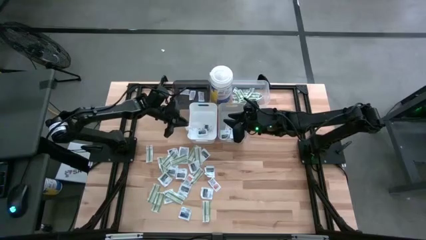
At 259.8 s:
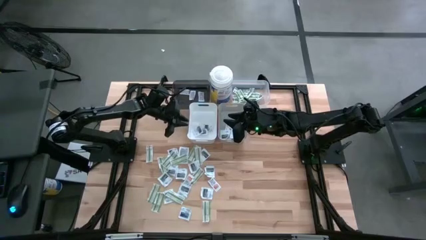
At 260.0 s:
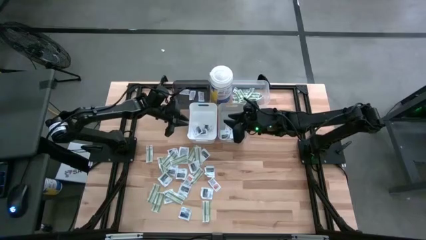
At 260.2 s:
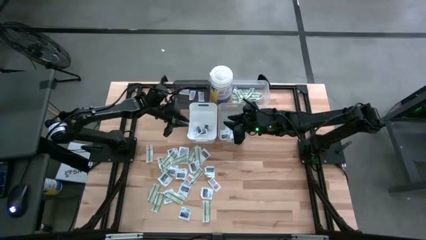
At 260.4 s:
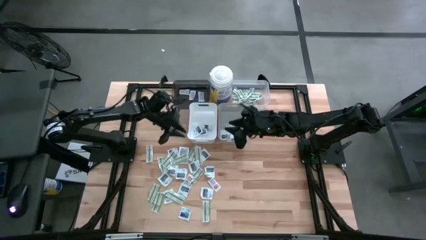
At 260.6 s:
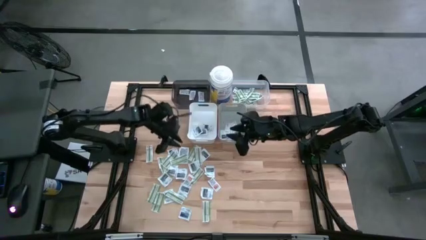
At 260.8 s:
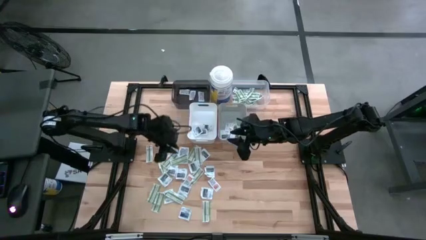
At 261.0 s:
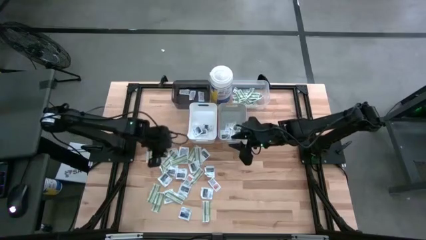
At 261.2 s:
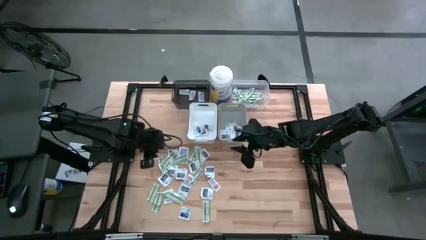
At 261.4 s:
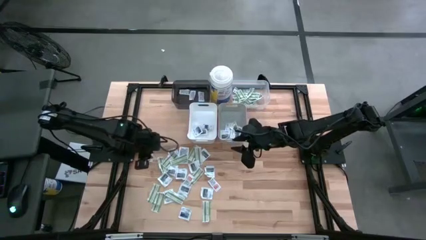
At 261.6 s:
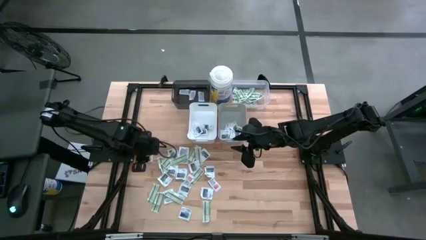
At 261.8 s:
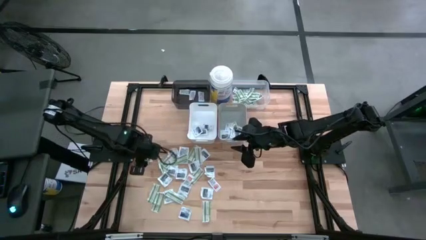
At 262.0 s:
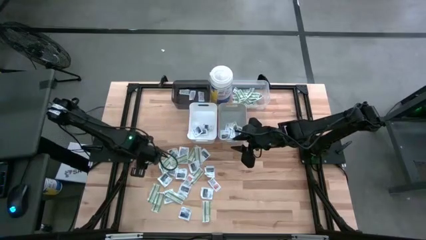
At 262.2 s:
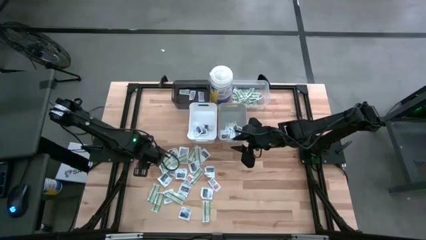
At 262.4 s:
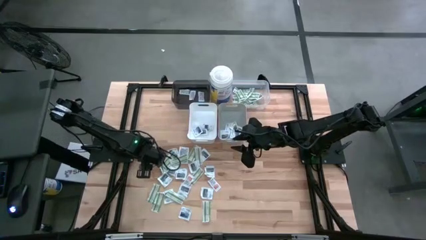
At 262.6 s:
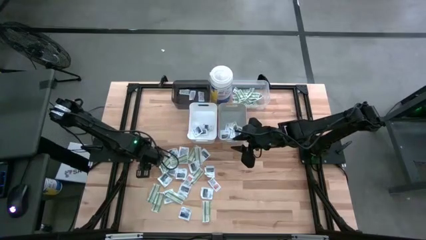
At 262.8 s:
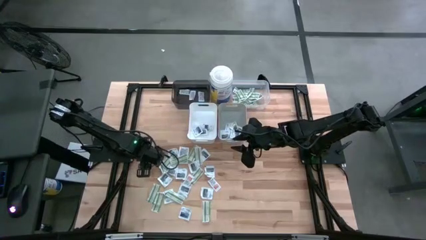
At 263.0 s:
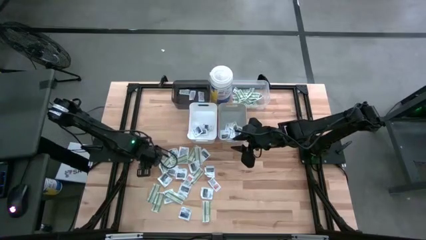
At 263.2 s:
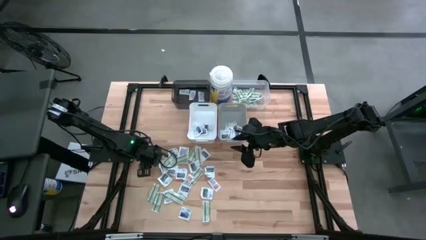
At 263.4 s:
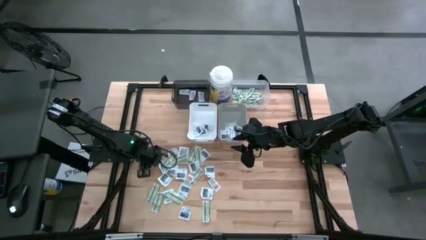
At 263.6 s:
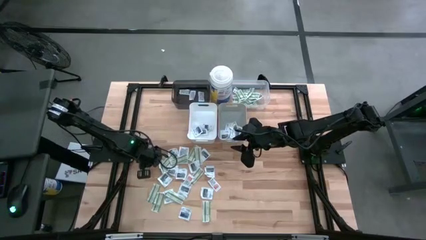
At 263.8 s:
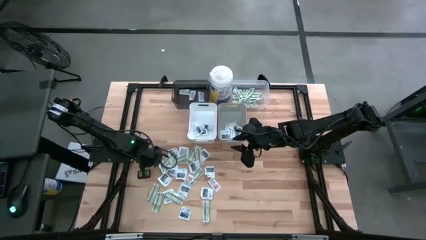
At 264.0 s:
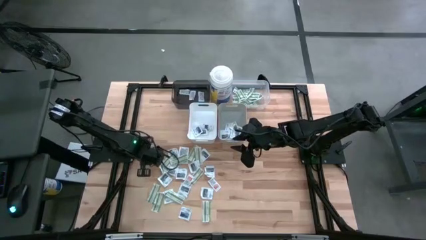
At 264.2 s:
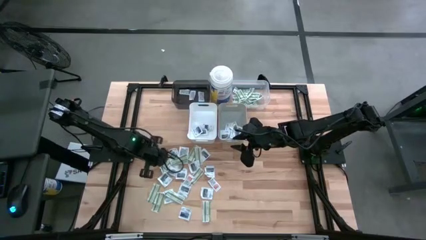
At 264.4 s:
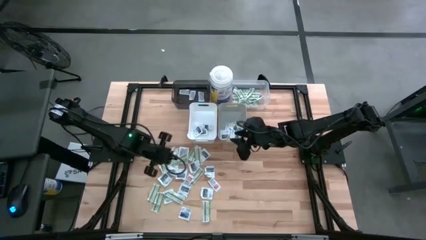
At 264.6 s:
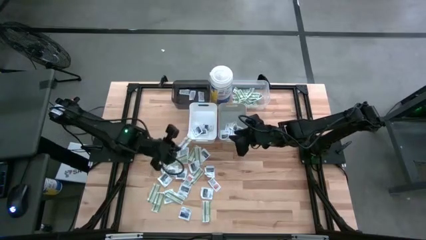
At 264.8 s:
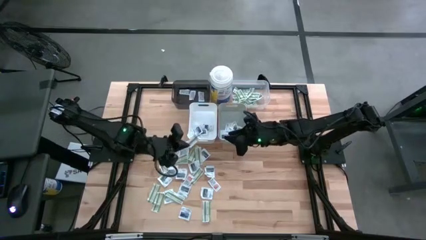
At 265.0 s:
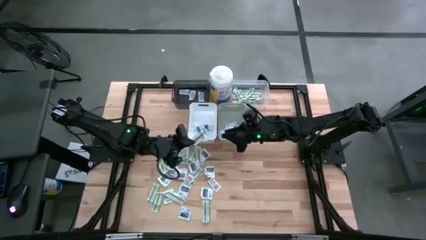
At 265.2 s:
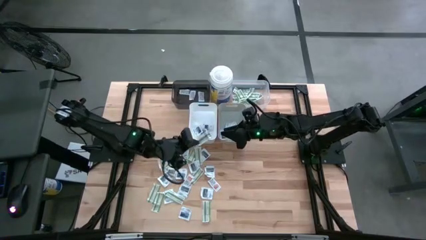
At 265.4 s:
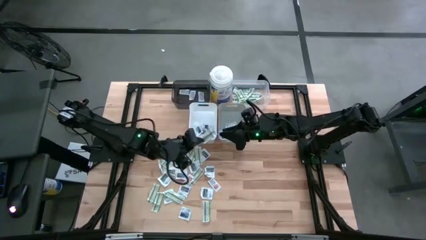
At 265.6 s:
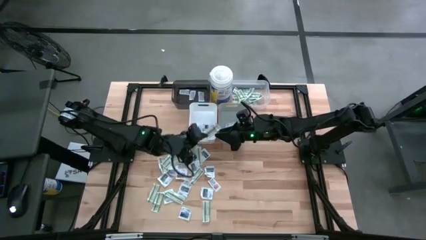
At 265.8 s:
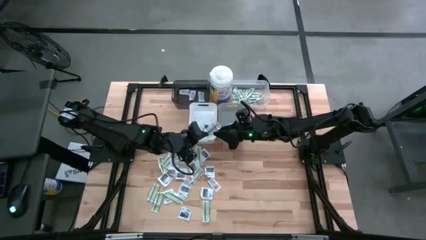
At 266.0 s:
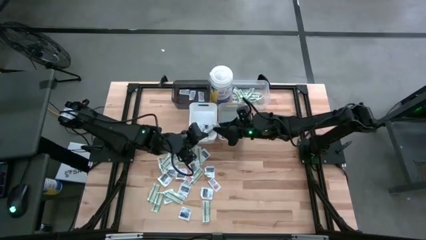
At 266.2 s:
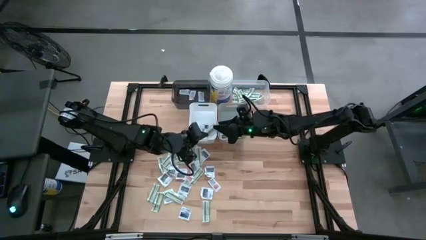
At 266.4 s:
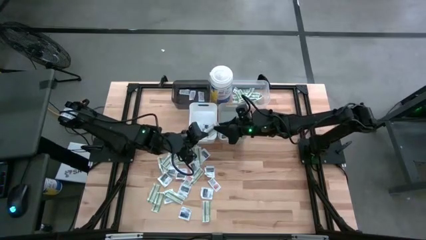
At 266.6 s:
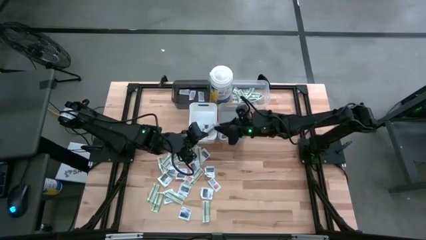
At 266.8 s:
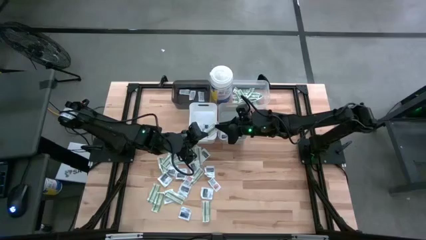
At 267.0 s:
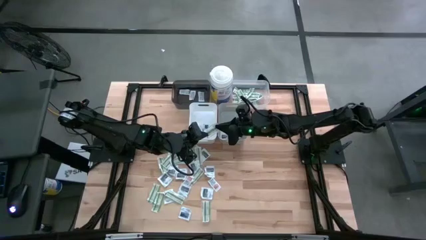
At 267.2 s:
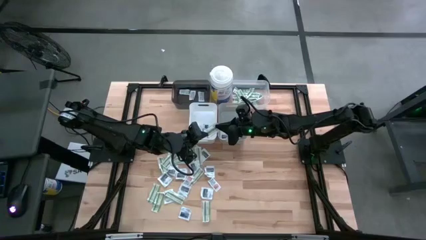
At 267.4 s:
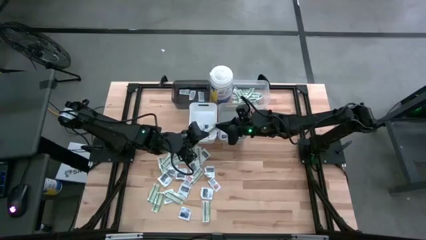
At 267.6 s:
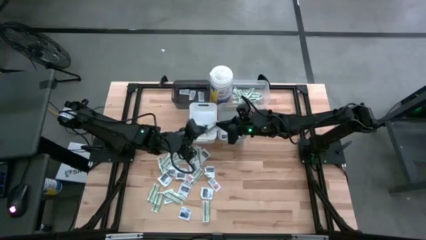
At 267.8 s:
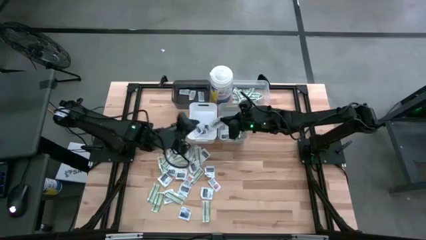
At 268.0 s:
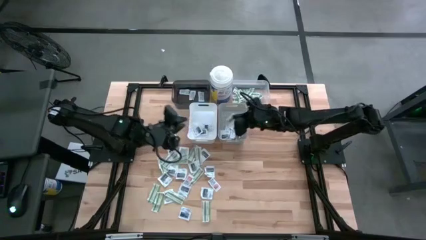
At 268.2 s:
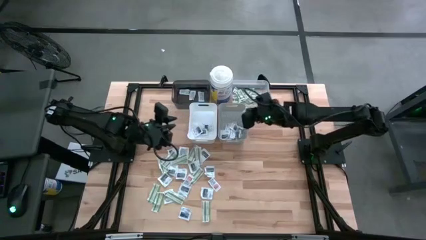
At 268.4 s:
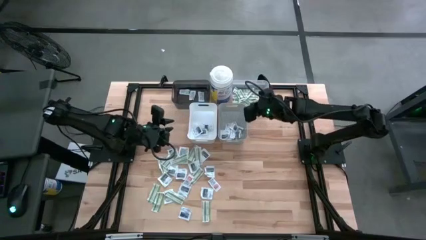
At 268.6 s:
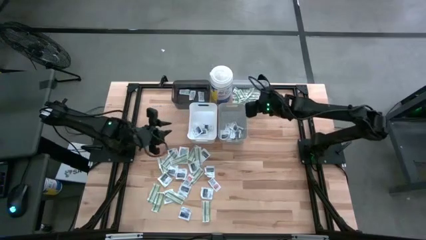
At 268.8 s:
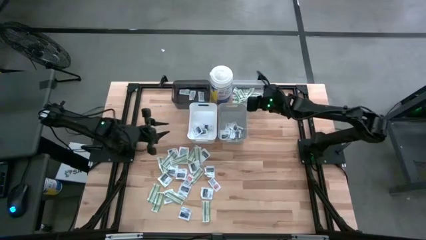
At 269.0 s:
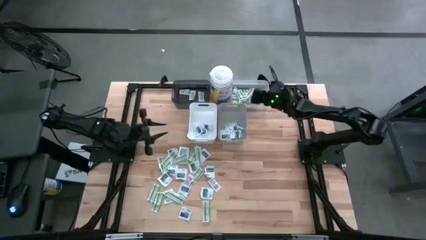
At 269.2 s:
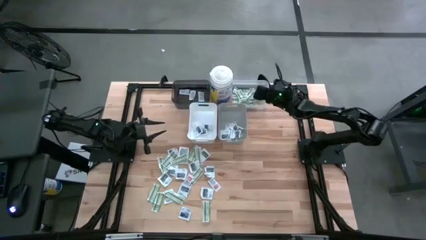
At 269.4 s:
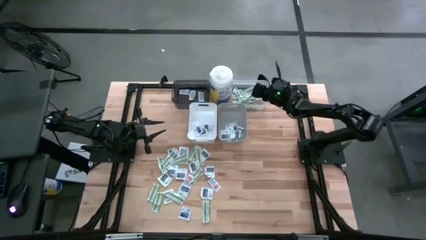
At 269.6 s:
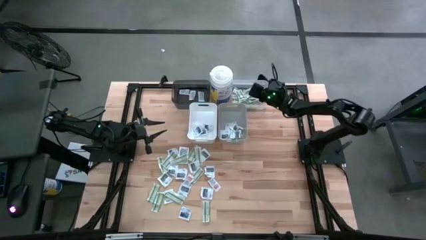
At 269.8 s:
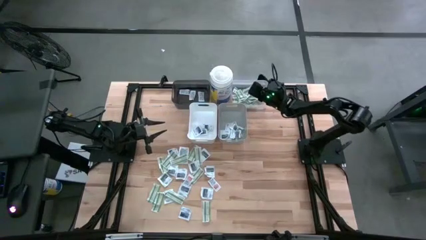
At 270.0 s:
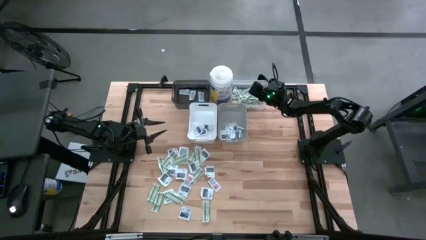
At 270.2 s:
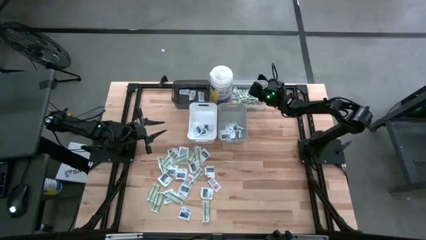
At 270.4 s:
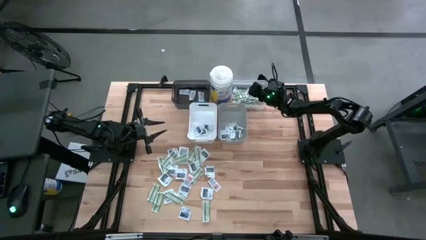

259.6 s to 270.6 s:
Task: Pick & Place First Aid Supplies
Put the band aid into the transparent bin
